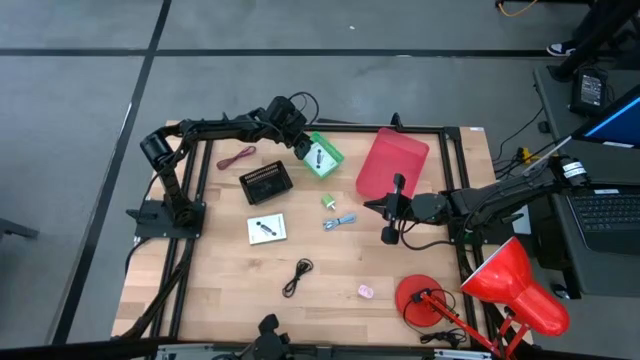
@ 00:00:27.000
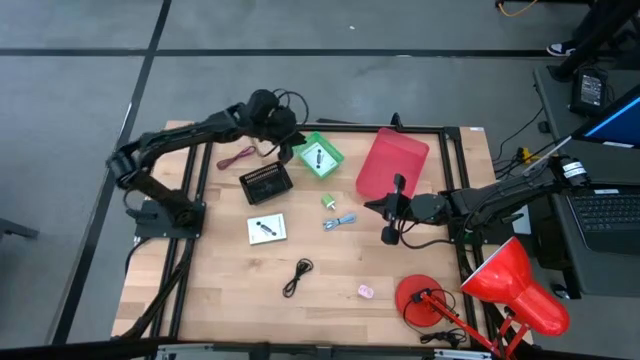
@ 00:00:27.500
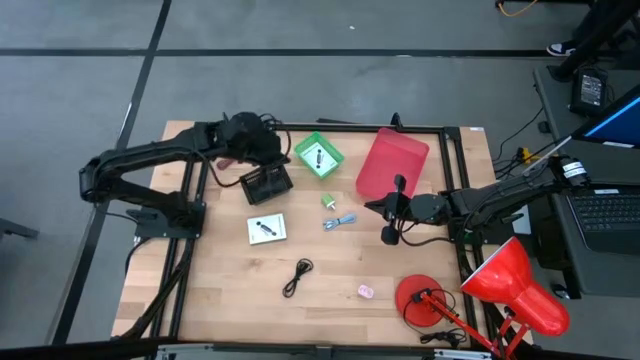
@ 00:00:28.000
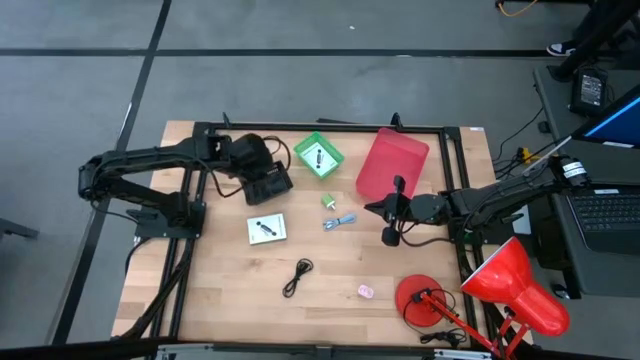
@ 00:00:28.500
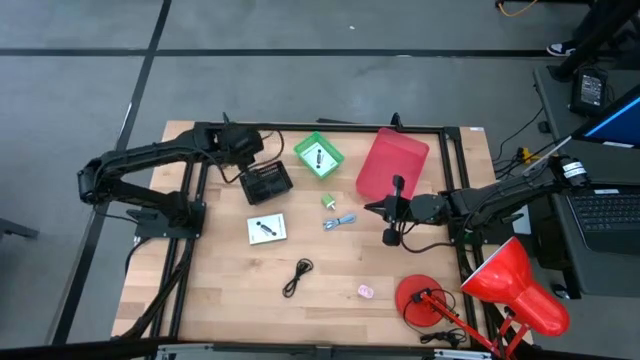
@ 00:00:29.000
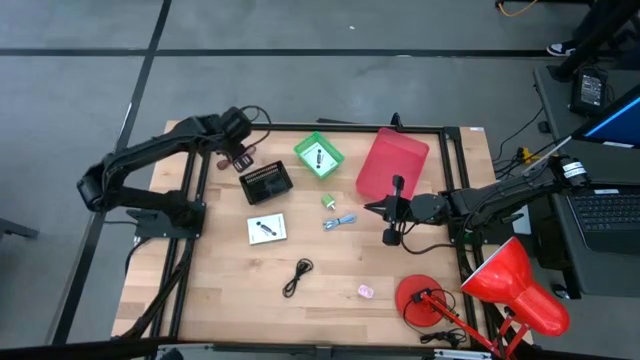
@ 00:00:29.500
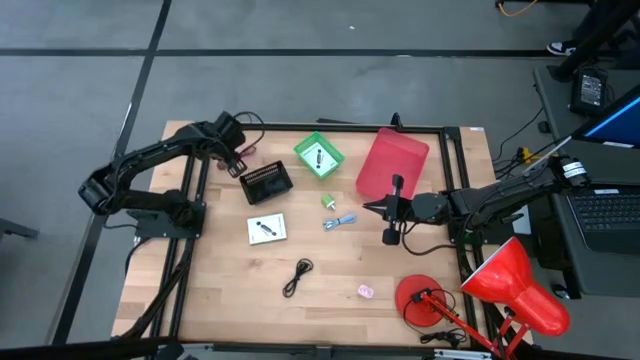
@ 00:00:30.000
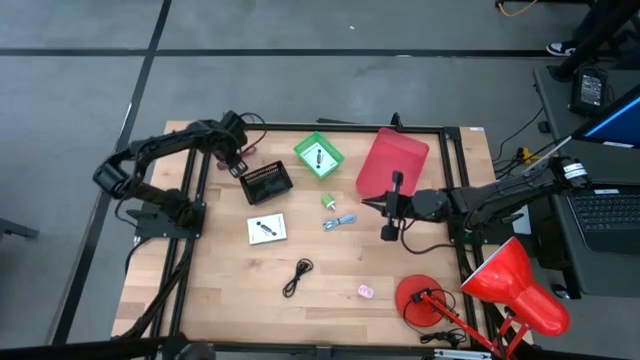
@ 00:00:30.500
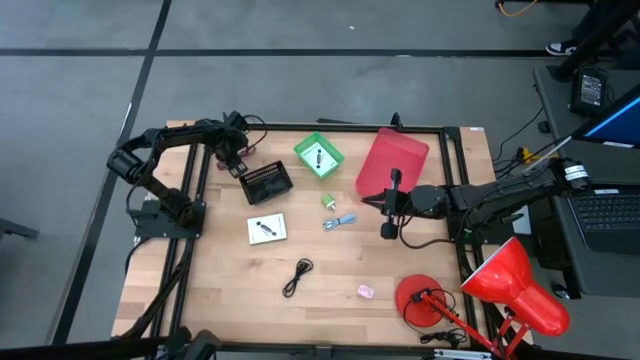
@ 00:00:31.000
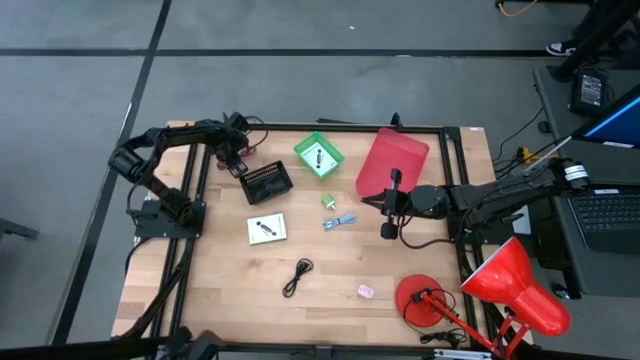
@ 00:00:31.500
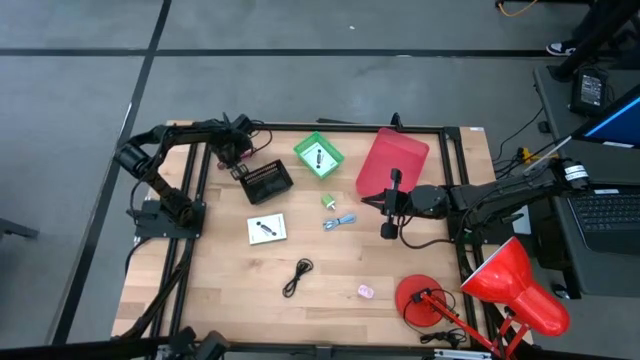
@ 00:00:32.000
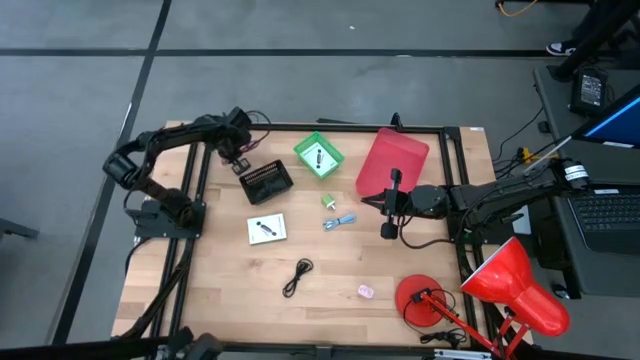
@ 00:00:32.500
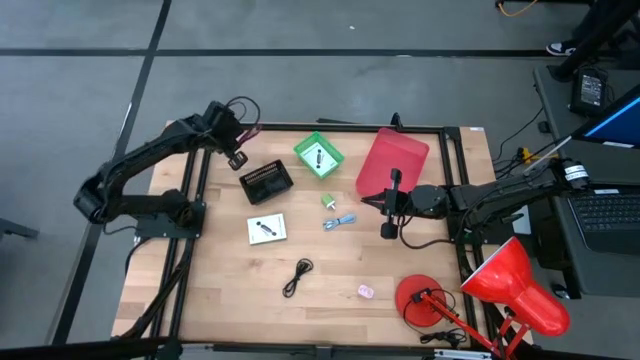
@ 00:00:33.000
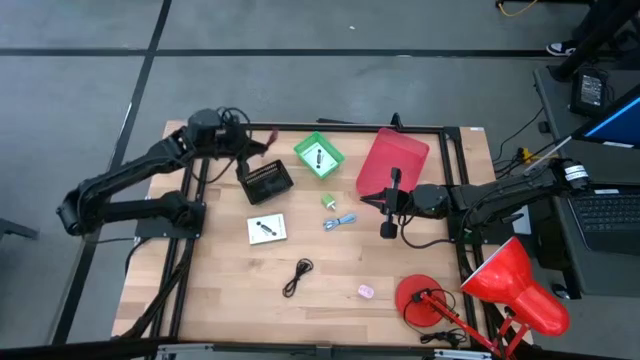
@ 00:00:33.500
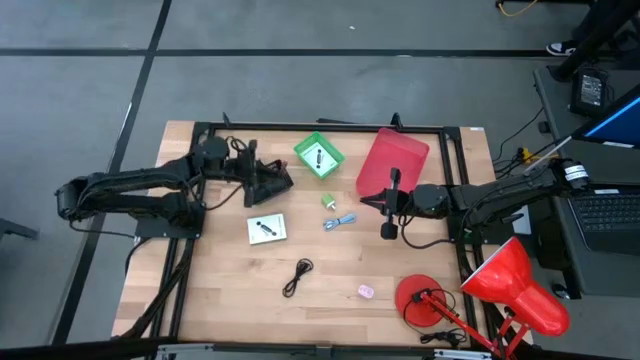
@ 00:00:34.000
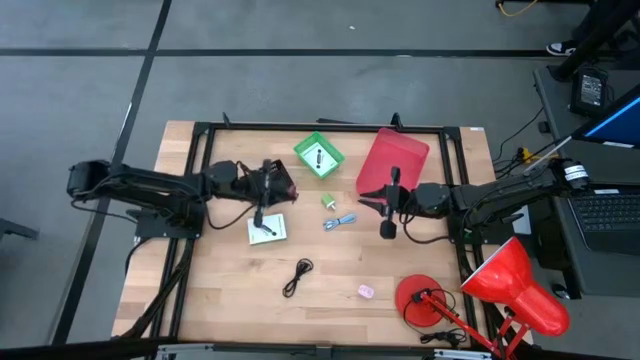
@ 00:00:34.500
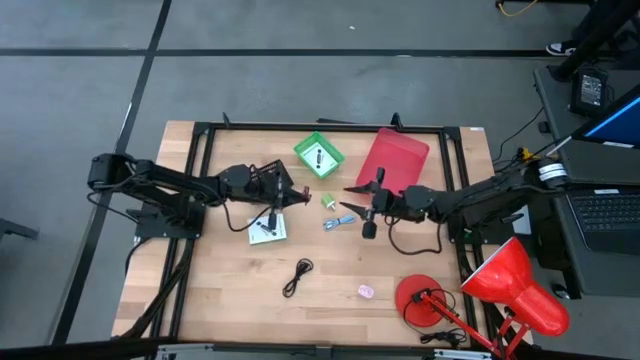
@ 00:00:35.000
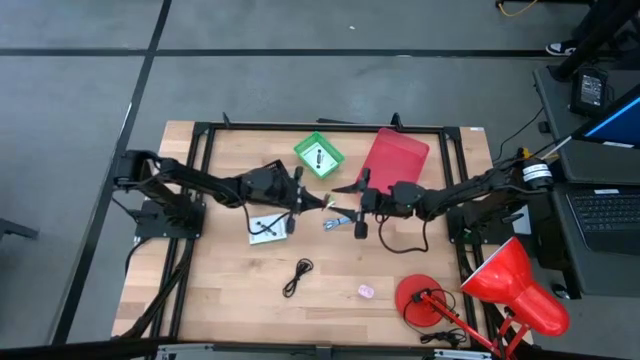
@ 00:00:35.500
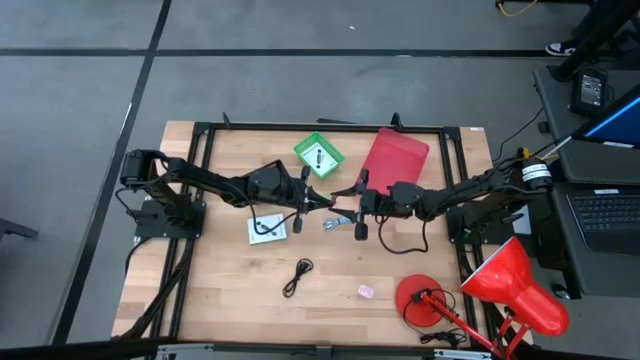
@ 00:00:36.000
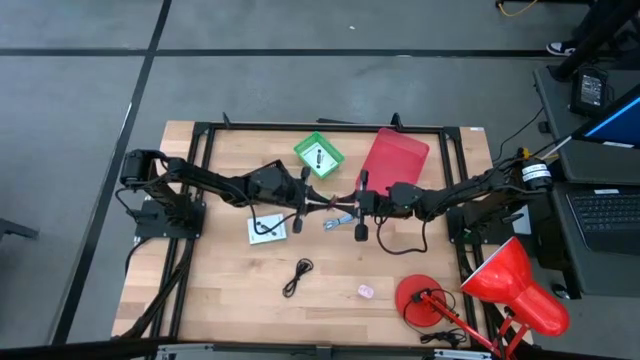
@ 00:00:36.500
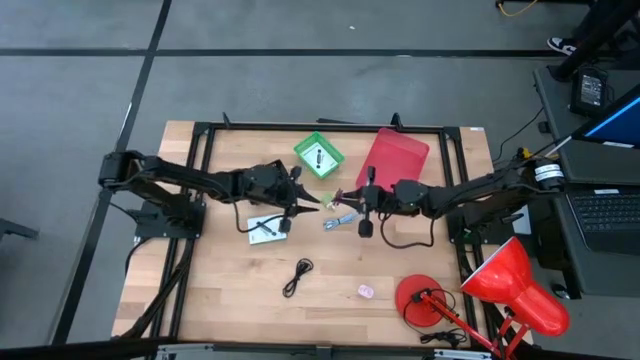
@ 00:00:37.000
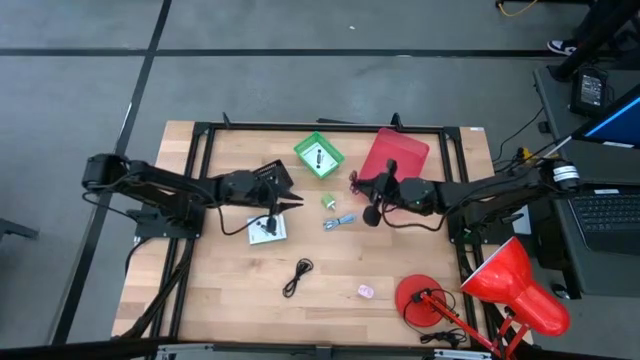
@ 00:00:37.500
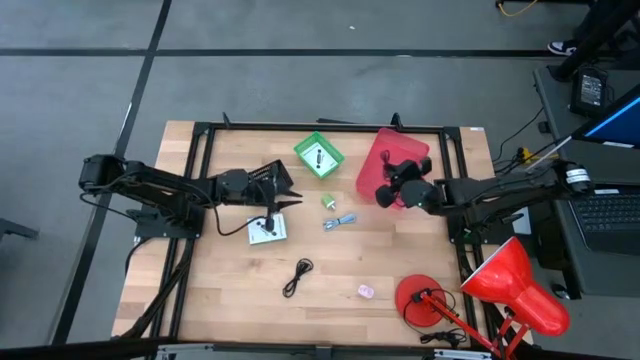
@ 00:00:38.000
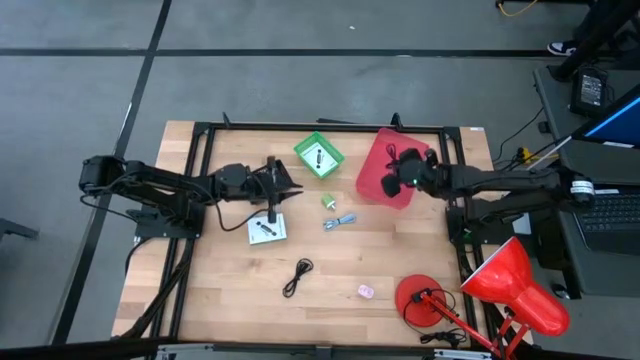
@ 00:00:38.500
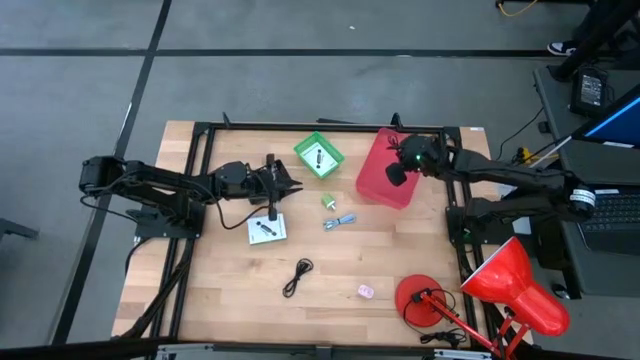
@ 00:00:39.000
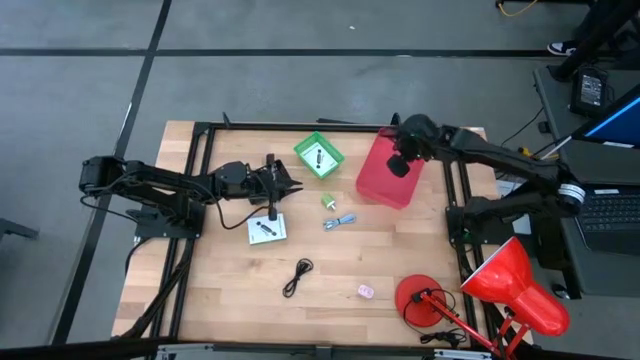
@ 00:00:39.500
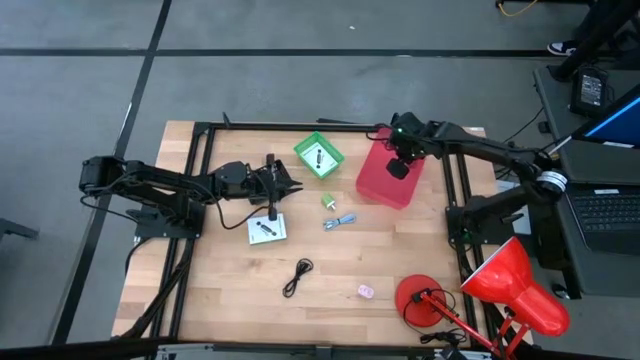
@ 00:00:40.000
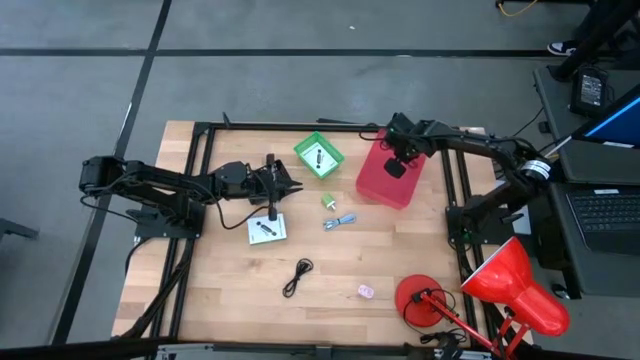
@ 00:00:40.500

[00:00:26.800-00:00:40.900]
Task: Pick and place items into bin
Put the pink charger cable into the pink bin

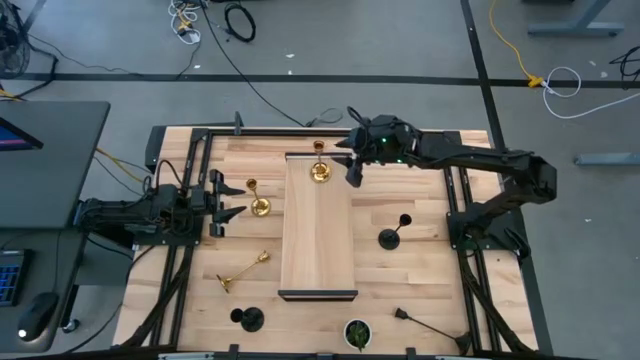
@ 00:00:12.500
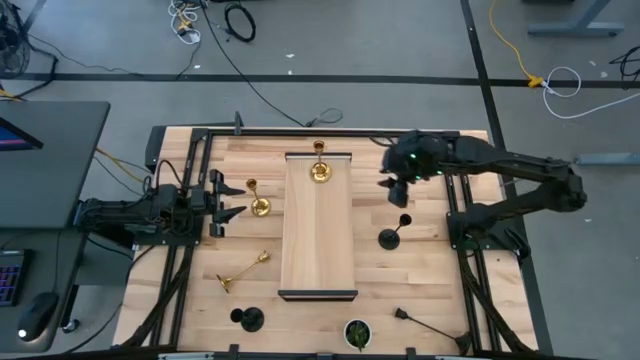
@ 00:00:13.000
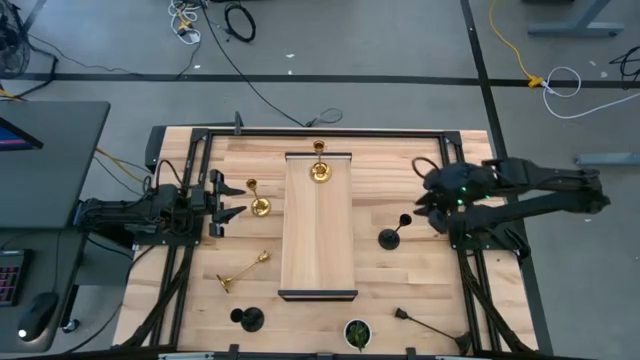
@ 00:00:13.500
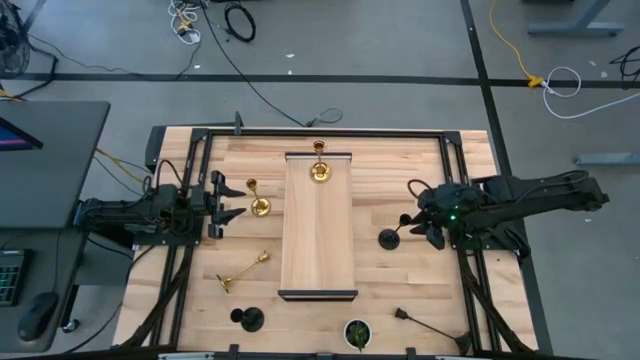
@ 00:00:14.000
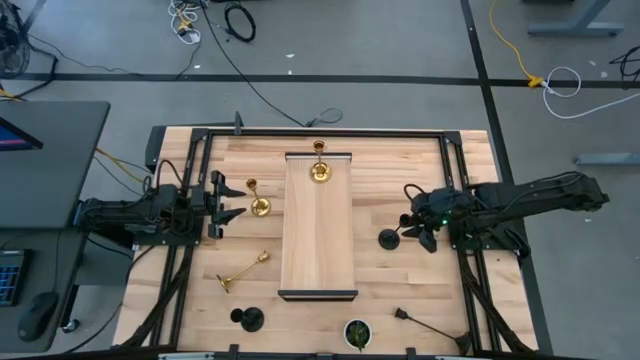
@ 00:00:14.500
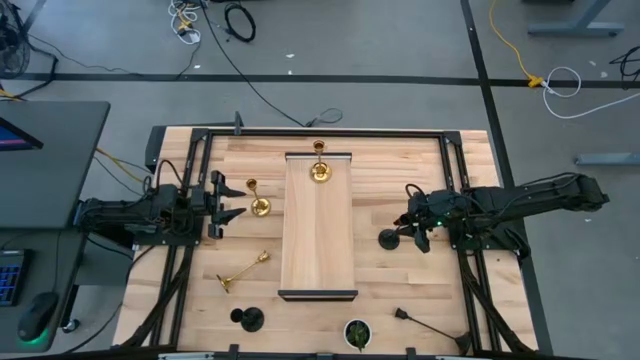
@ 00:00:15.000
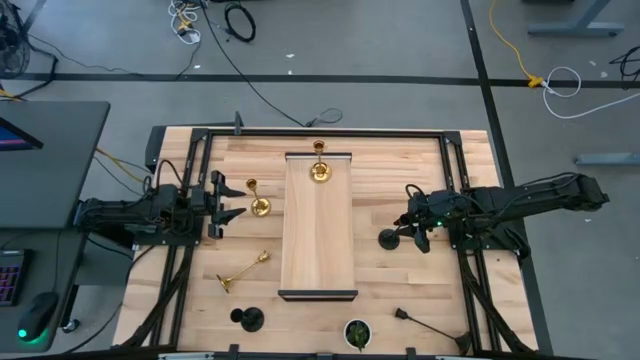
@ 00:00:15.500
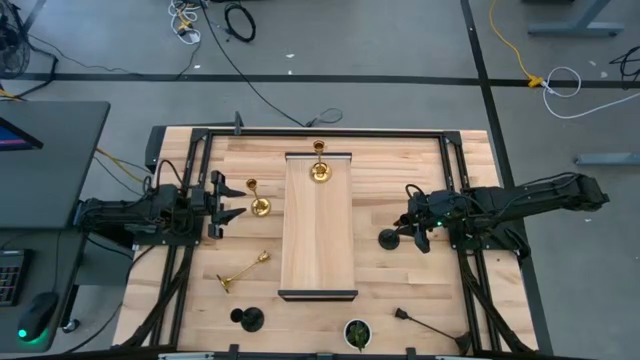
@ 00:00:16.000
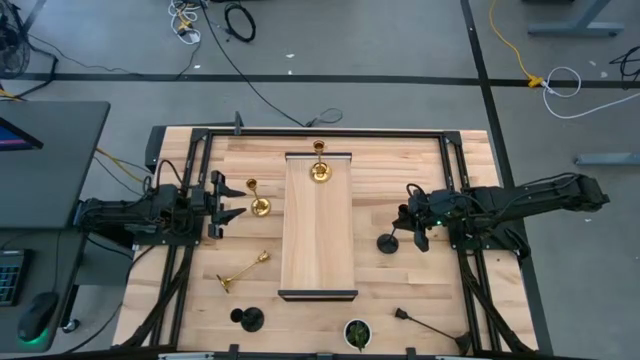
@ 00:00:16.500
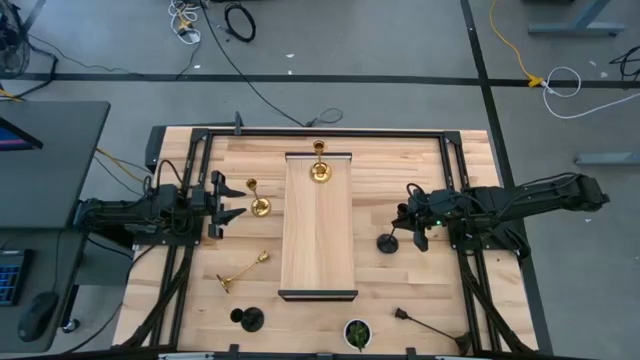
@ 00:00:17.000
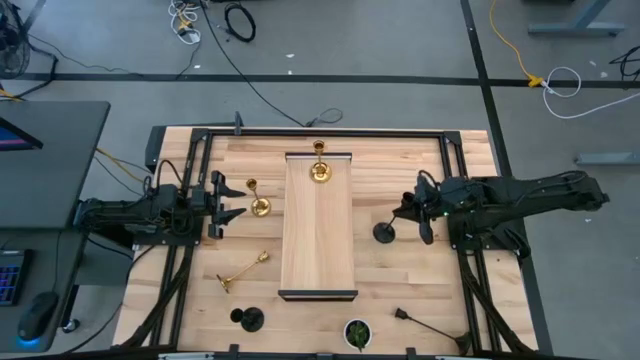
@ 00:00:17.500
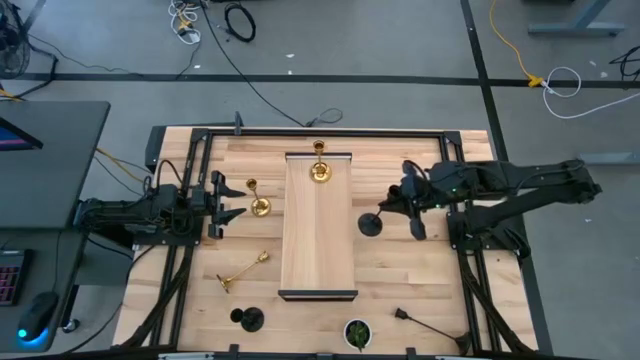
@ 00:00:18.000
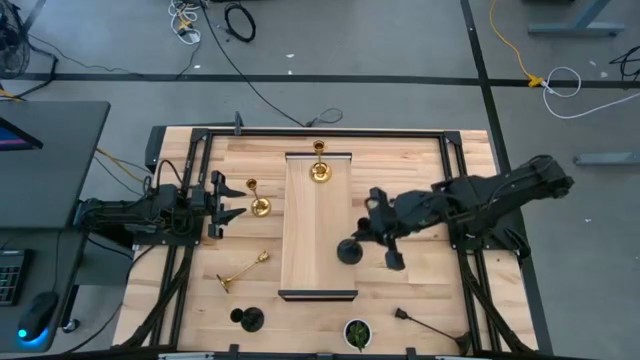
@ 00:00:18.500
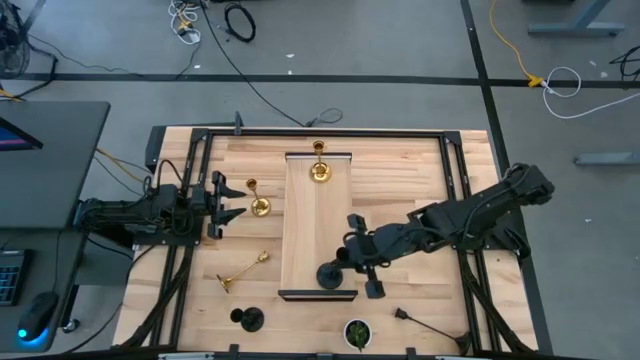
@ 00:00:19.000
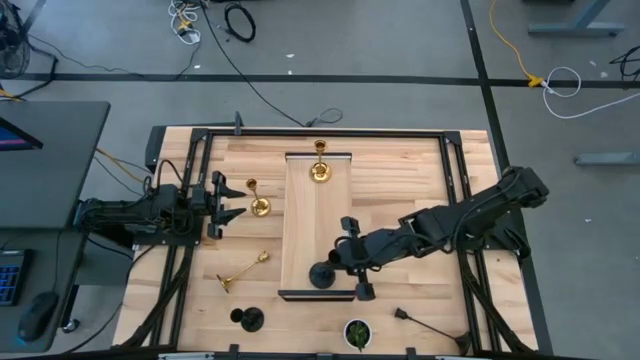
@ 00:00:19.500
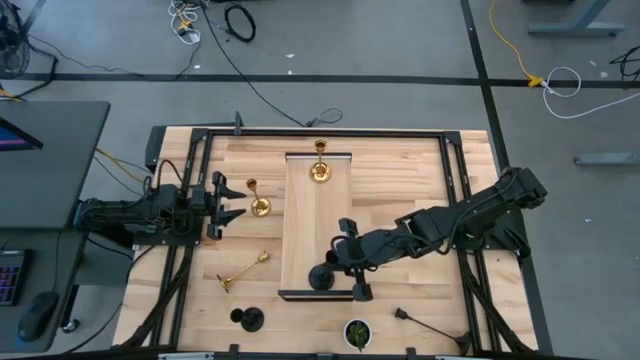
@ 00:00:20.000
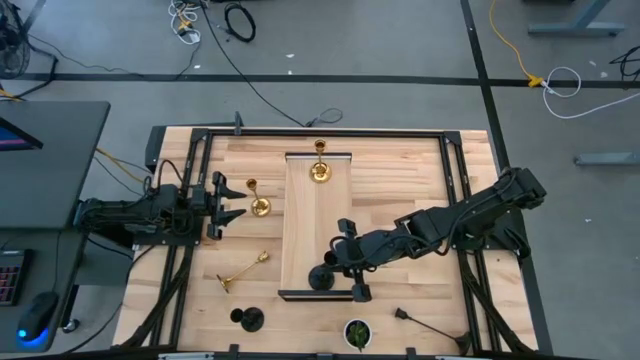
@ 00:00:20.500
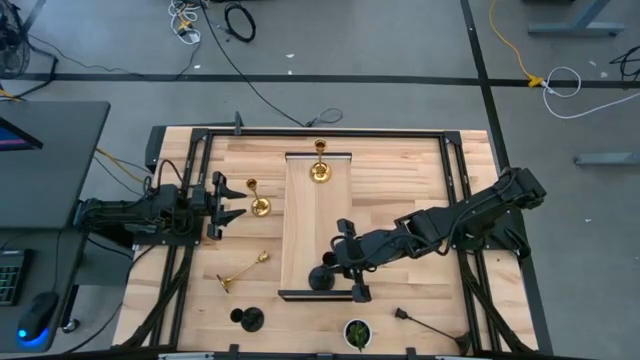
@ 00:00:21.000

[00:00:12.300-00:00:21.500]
Task: Pick & Place candle stick holders
Put the top black candle holder on the shelf
